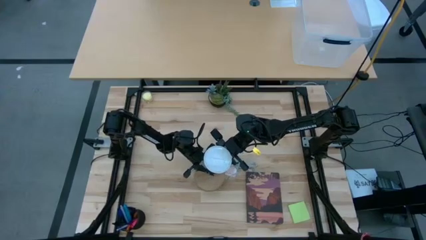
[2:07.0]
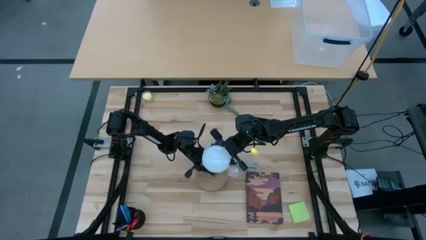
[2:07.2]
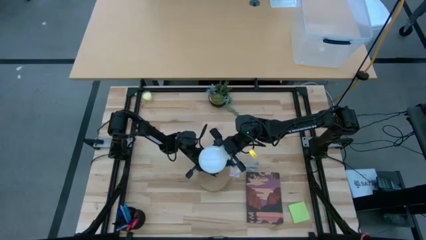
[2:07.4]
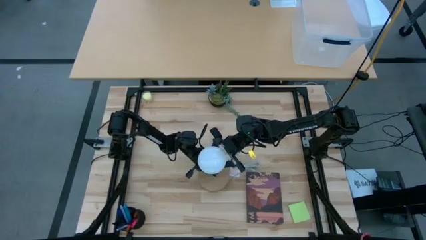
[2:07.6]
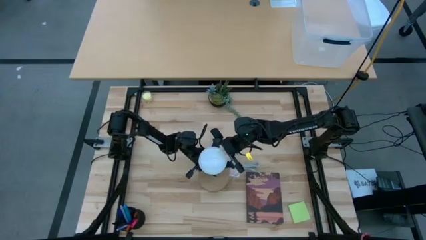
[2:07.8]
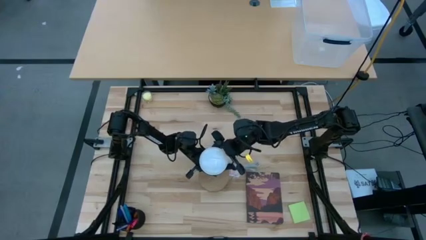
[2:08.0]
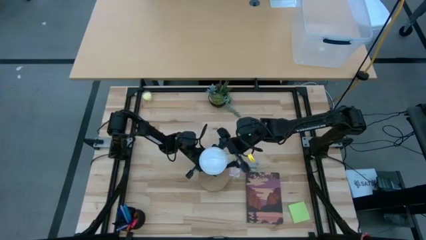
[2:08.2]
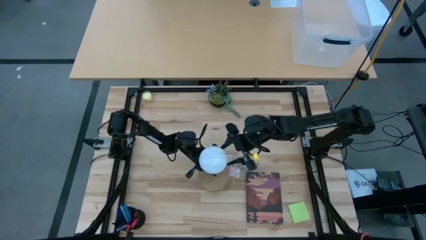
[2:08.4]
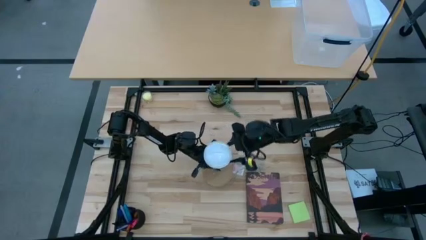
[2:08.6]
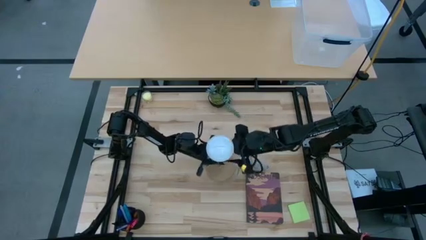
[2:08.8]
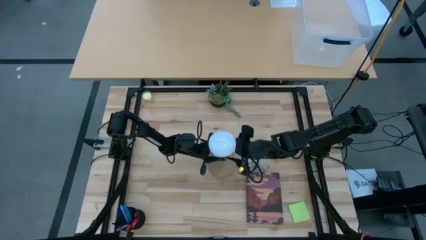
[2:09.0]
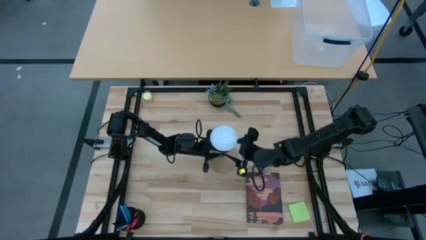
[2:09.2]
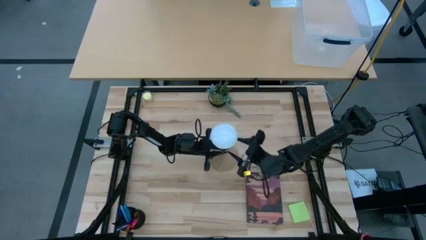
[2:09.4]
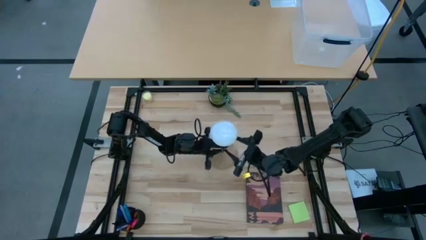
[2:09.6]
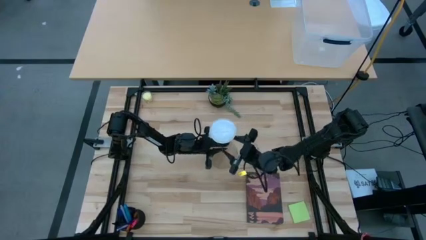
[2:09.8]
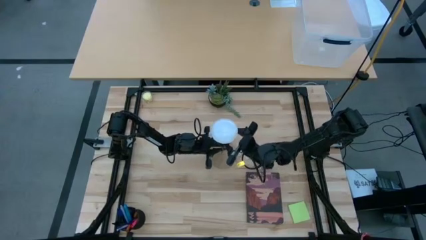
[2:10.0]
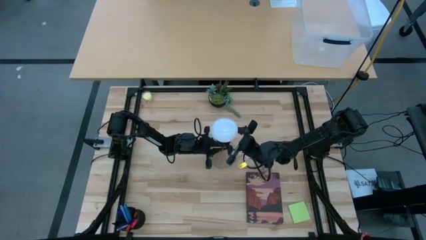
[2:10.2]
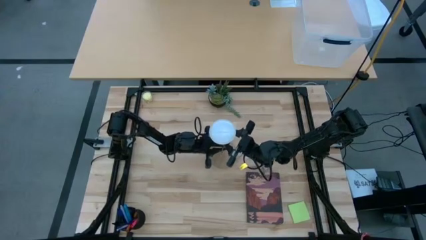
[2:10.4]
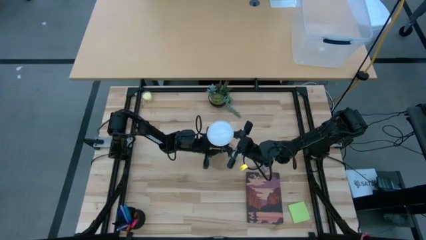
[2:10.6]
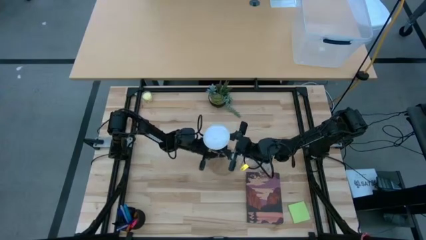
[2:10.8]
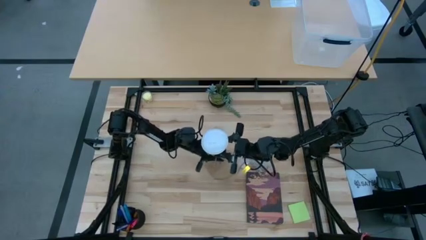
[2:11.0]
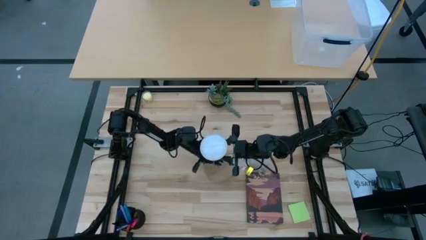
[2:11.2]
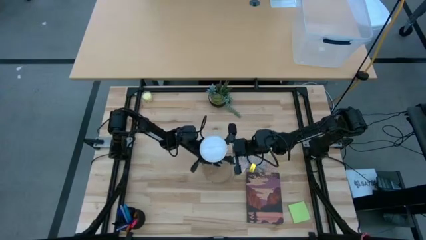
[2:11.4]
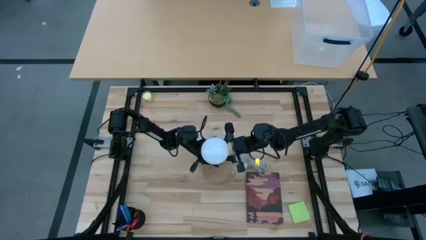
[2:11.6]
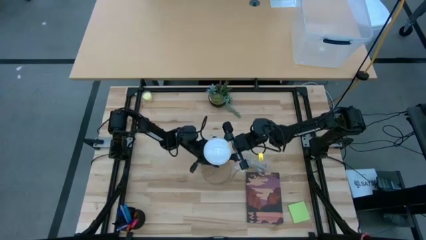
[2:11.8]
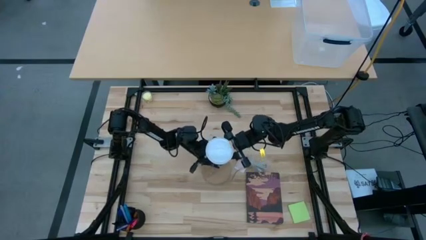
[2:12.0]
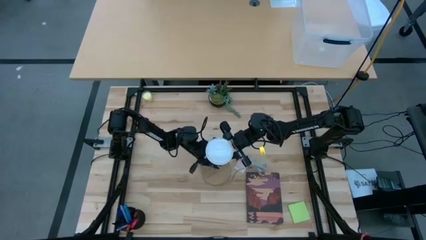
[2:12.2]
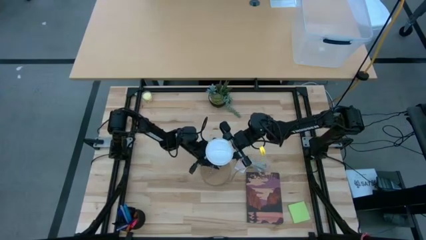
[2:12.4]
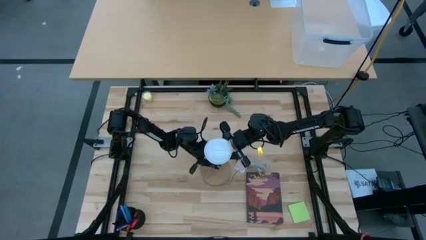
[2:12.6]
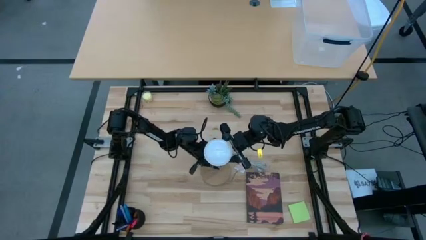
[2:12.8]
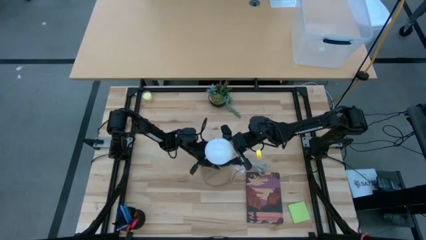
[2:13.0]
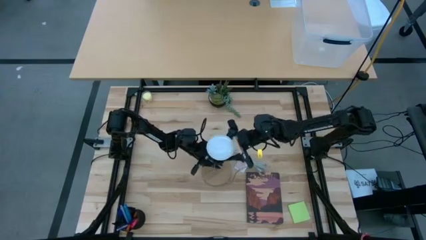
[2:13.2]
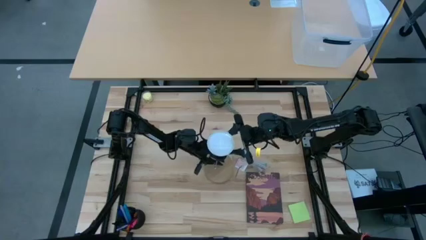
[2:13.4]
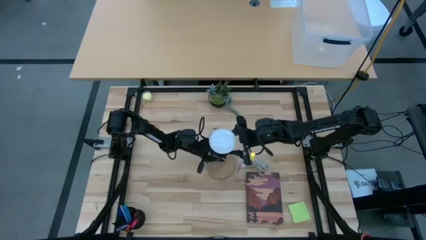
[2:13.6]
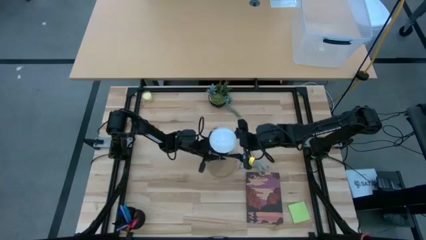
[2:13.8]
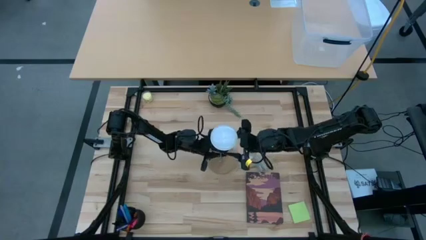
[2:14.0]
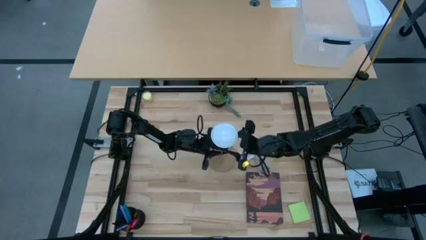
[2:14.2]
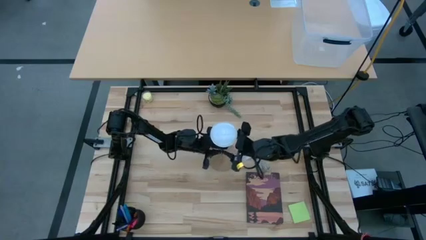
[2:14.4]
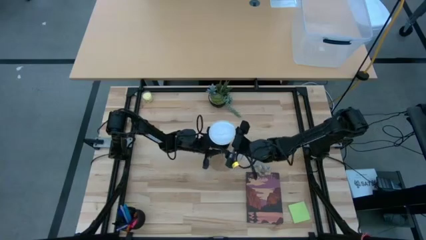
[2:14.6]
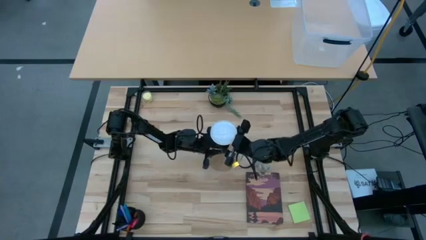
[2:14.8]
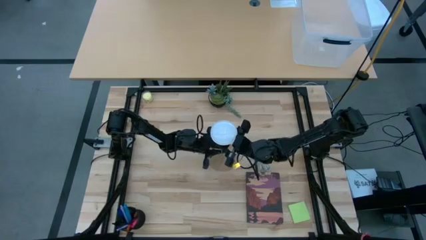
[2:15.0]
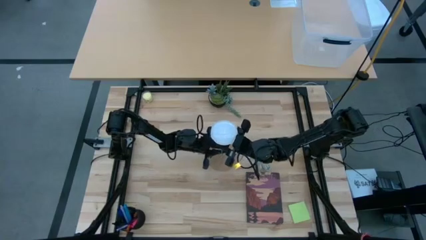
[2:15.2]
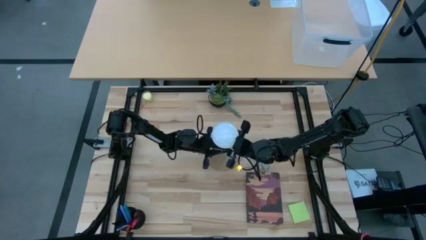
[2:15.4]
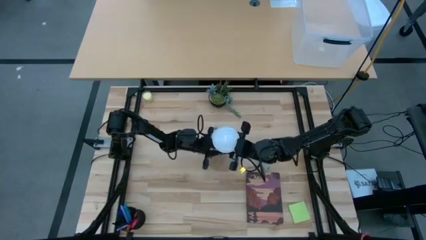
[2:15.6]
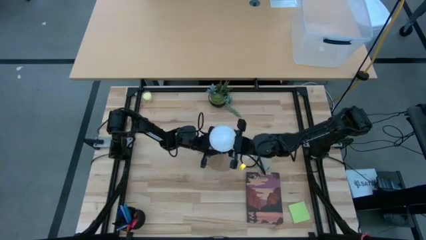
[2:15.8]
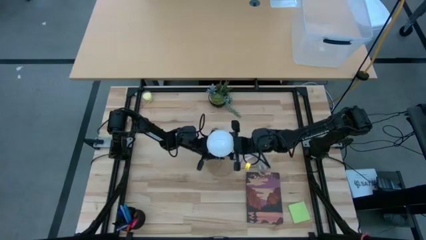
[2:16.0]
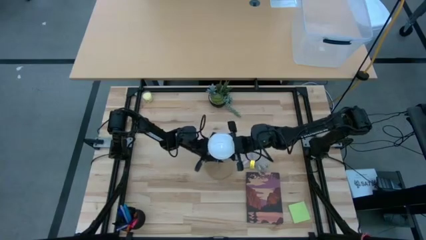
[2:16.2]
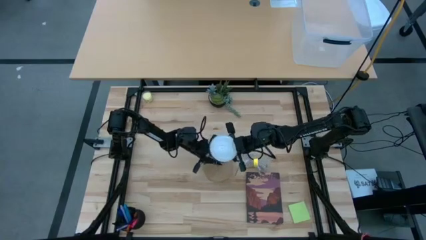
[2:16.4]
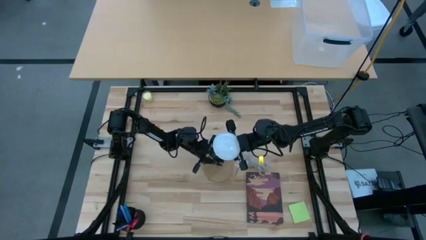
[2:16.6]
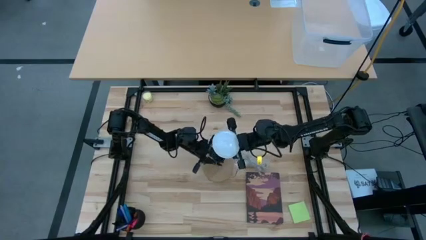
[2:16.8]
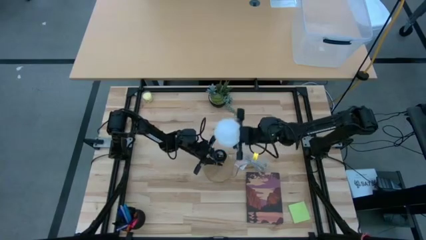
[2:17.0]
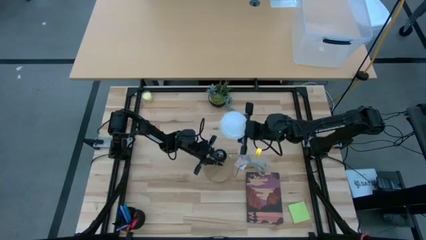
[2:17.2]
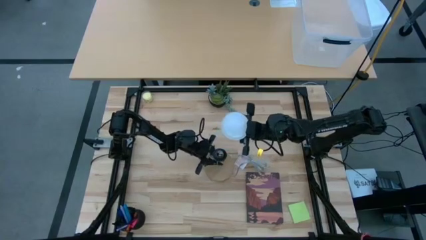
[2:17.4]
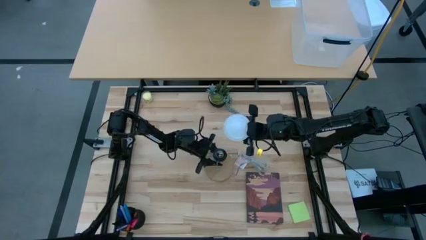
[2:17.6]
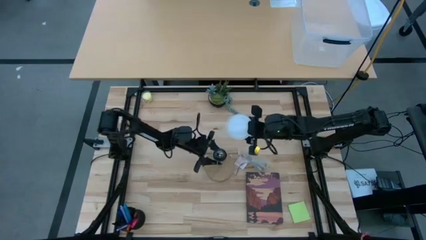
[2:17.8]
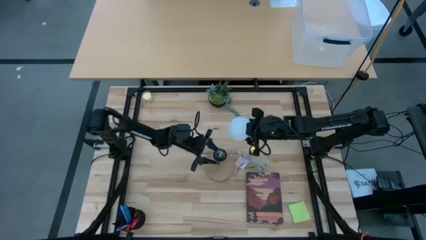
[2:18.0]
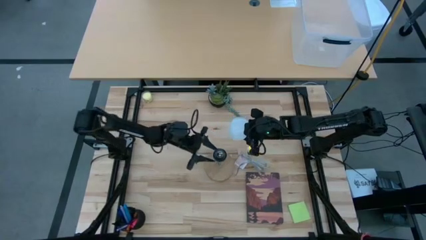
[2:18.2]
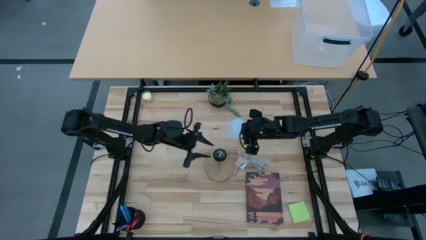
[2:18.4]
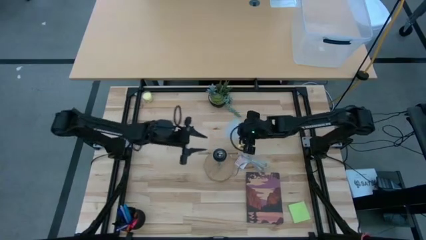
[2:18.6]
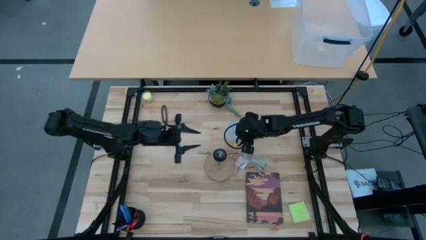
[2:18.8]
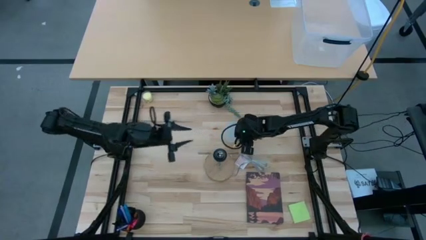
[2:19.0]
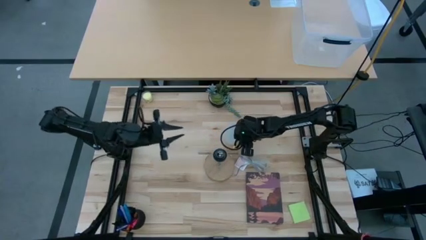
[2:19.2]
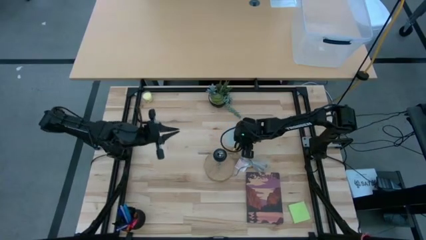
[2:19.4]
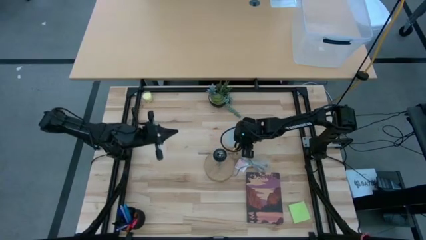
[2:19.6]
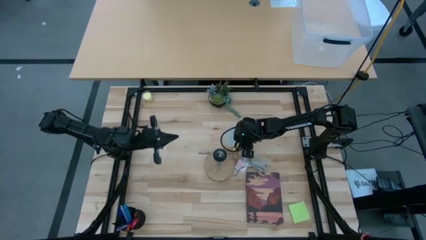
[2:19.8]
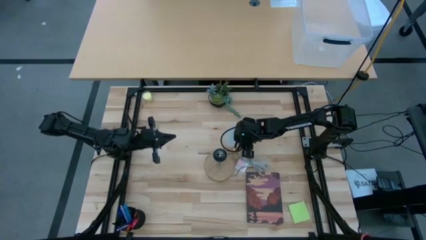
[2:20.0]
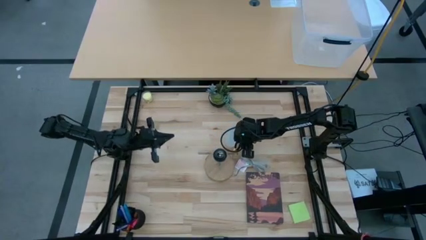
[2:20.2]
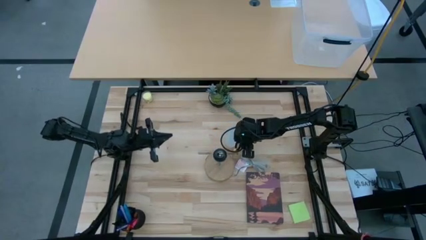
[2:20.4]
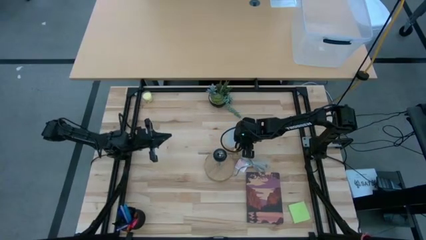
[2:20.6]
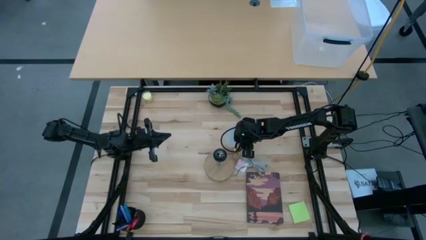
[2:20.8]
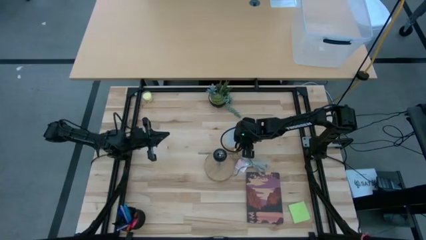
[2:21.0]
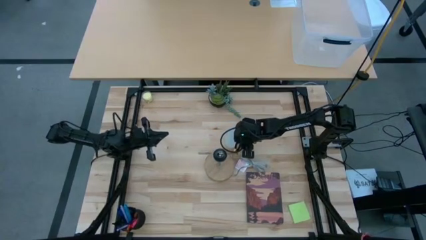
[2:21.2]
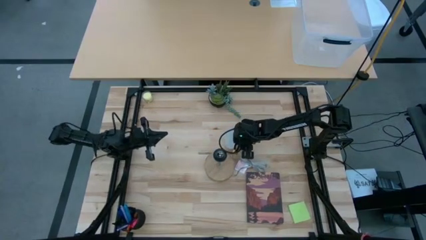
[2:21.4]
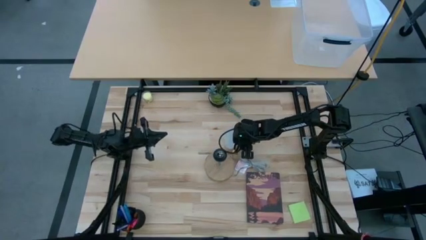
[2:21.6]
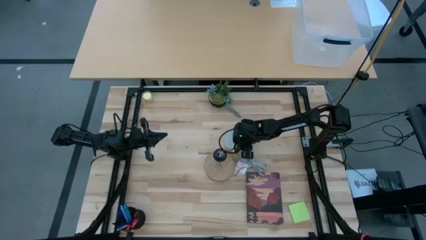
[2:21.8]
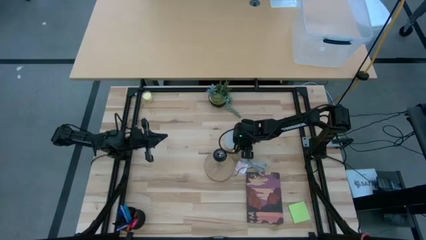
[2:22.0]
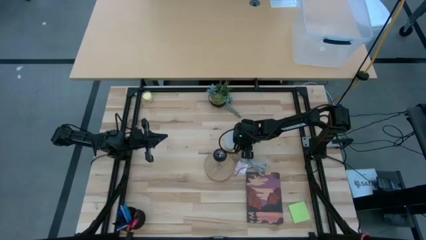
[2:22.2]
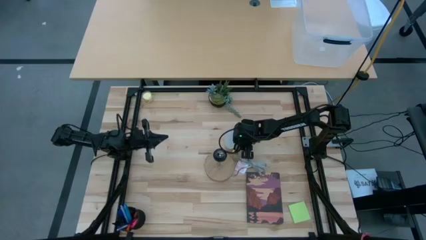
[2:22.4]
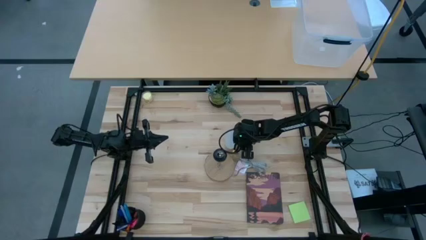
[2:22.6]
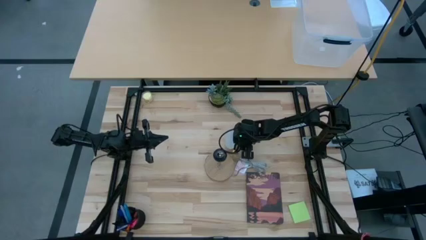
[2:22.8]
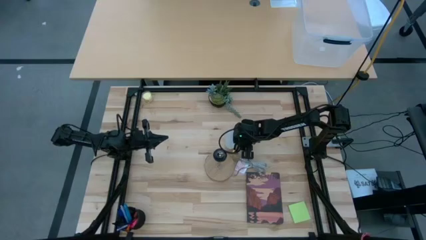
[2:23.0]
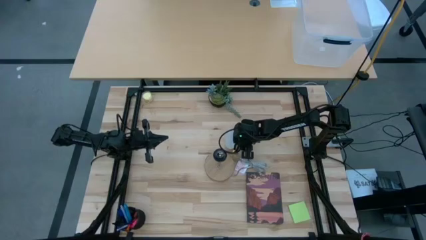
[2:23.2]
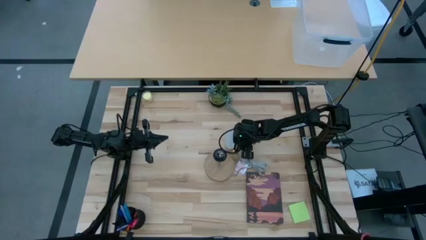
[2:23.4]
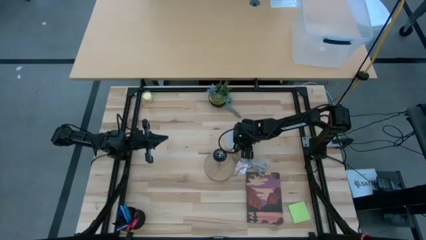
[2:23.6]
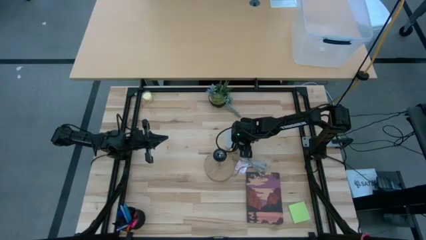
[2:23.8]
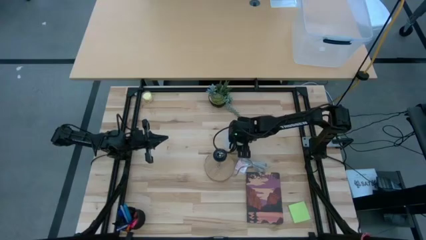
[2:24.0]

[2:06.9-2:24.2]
Task: Screw lightbulb
Remove the white lightbulb from the silver lamp
